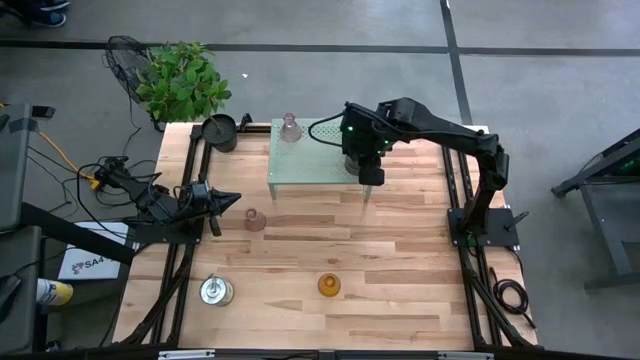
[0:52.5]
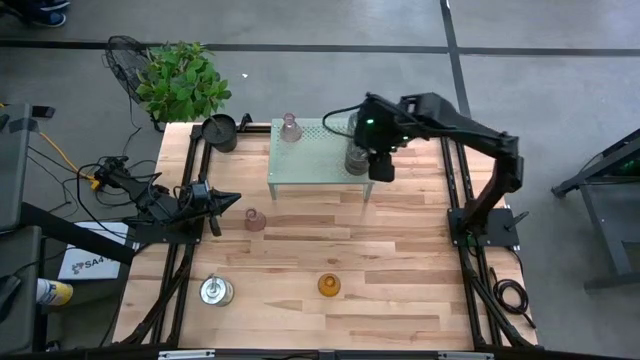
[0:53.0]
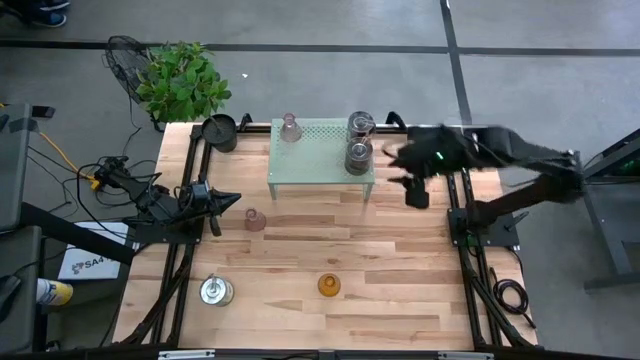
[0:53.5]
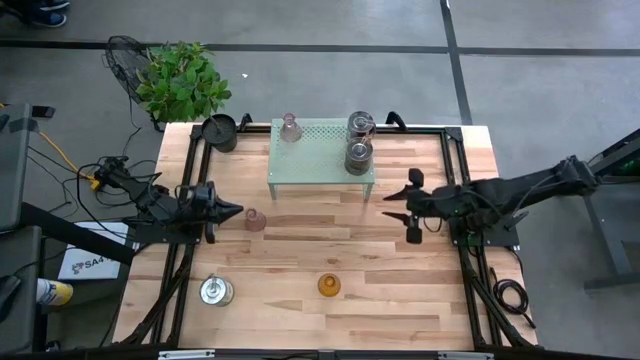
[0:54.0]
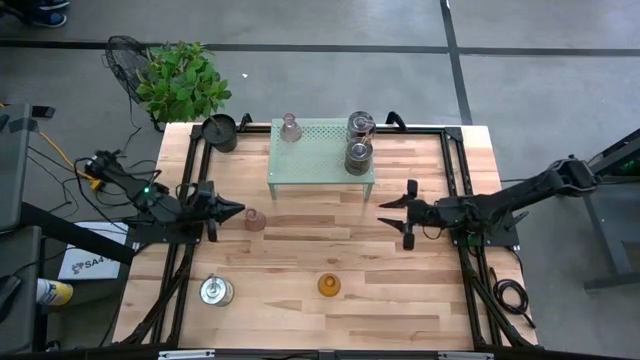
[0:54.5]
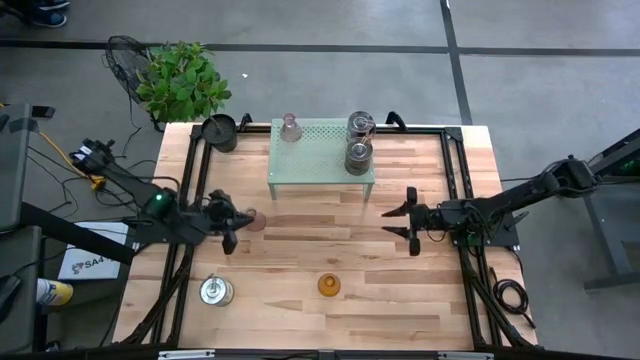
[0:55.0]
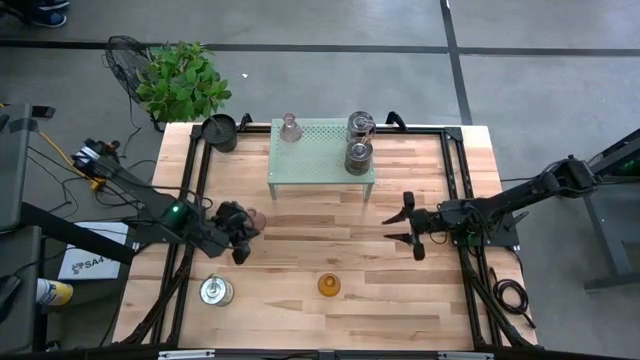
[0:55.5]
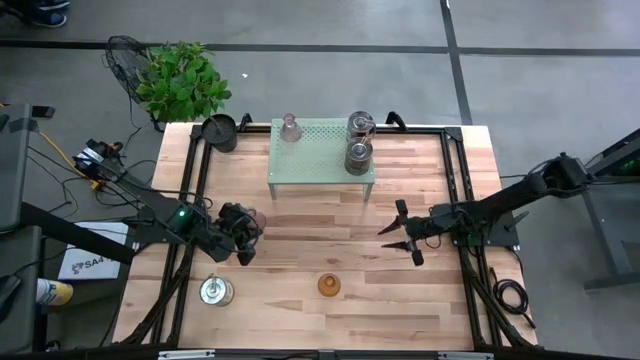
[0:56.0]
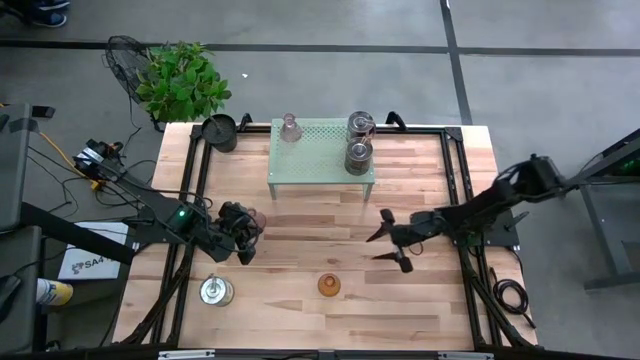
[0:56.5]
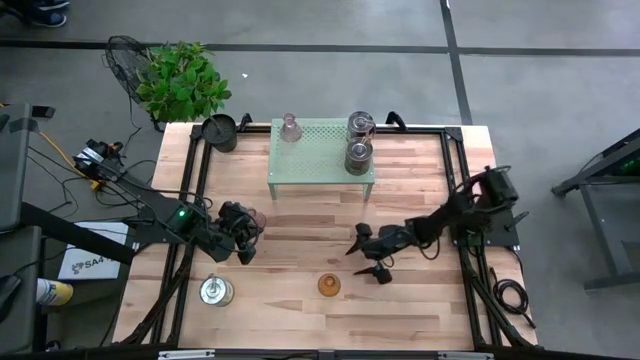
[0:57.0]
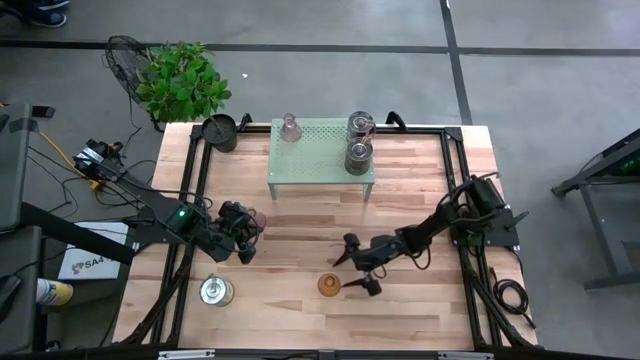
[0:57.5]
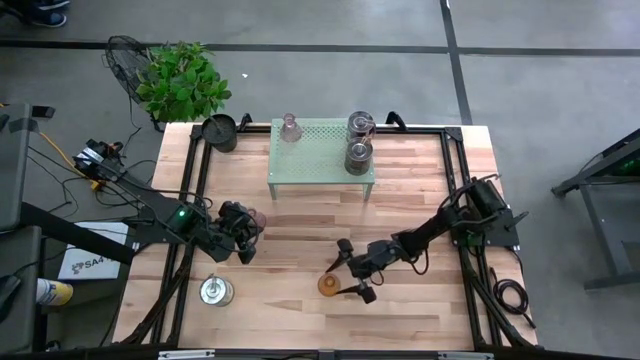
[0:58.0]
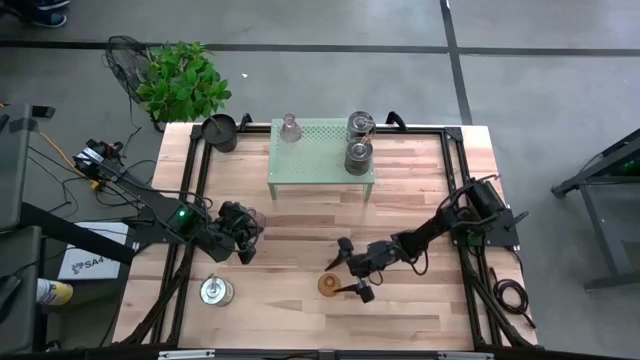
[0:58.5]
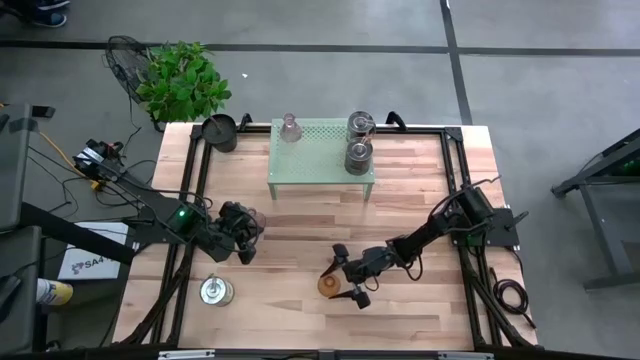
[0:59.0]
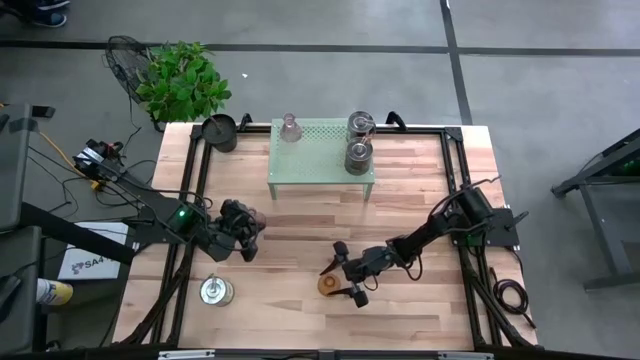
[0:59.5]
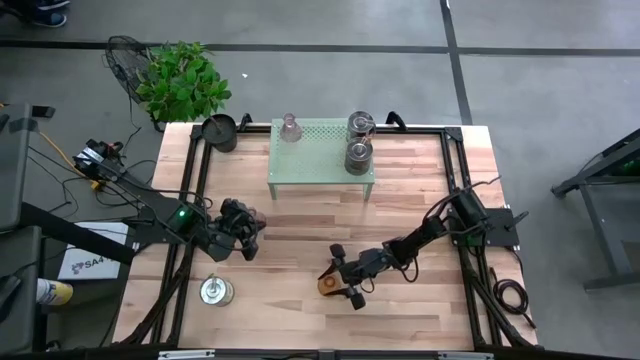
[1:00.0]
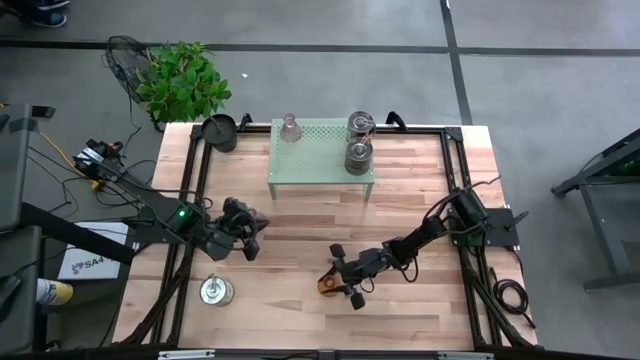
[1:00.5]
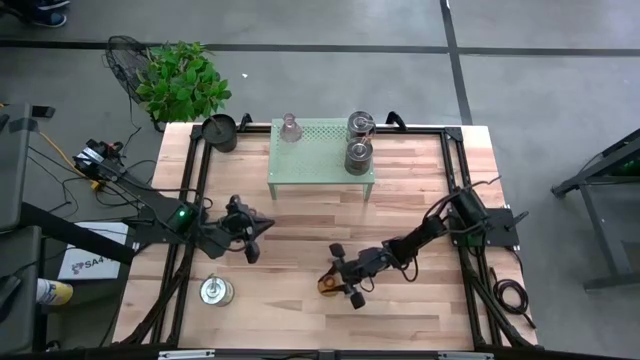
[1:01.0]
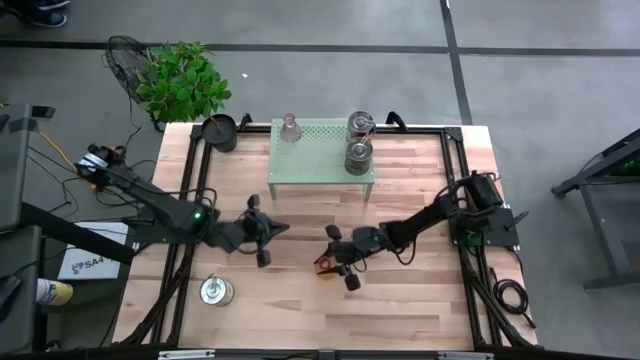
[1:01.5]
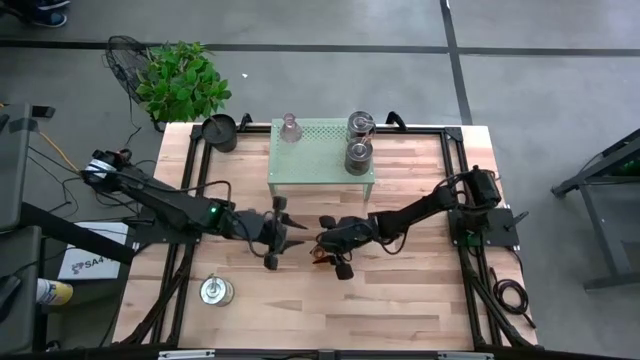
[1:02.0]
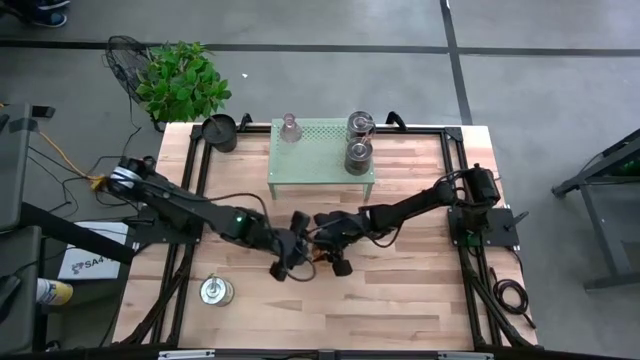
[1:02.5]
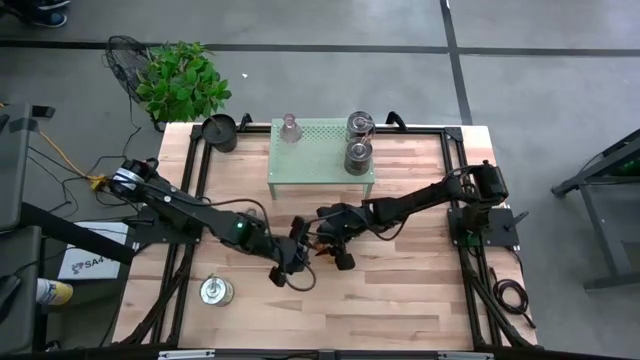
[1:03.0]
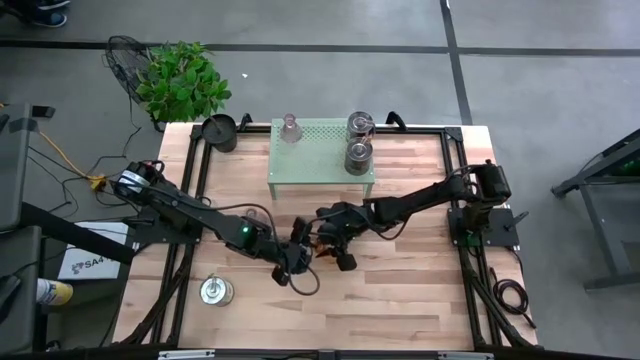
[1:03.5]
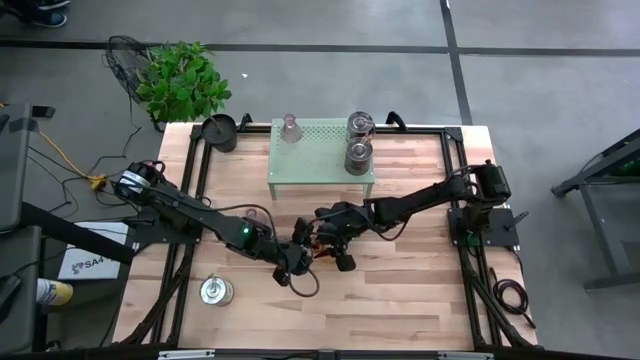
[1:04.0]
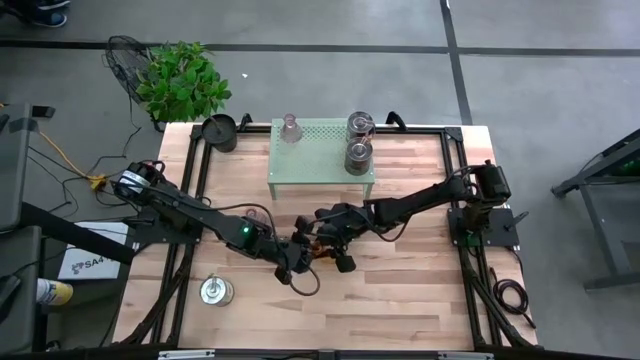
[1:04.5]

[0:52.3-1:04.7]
Task: Pick & Place candle stick holders
Put the yellow candle holder on the shelf

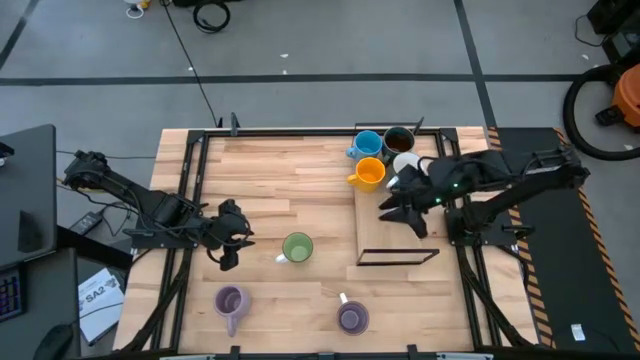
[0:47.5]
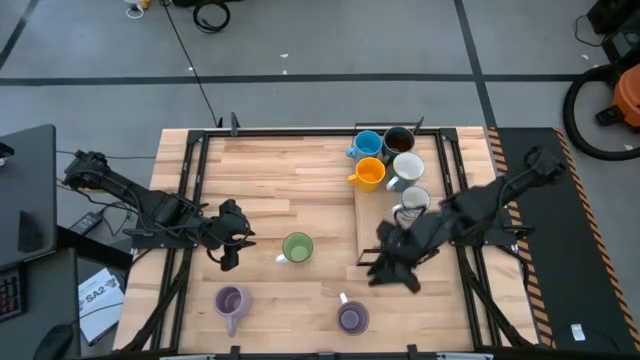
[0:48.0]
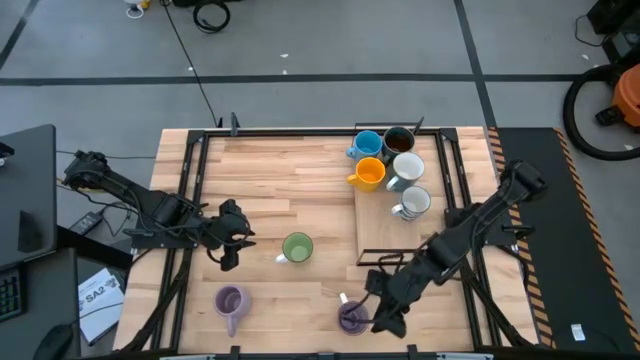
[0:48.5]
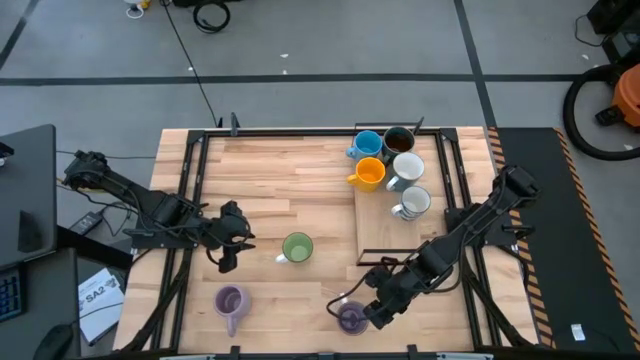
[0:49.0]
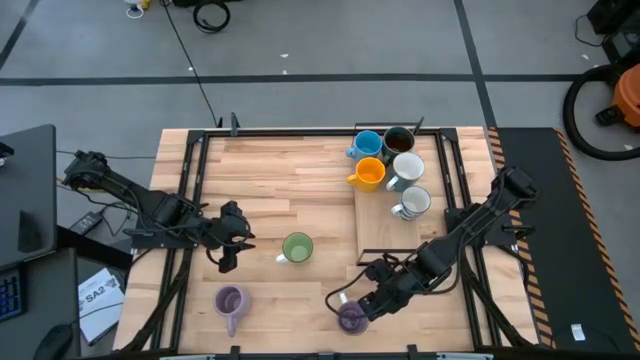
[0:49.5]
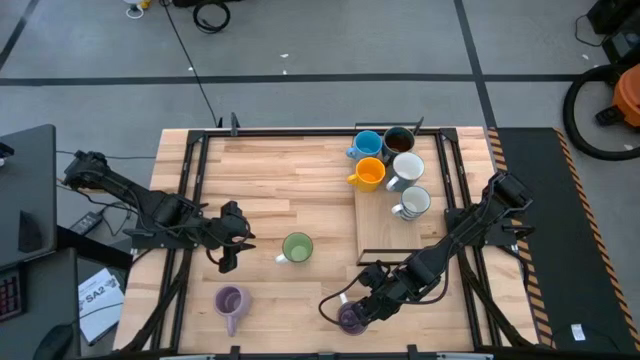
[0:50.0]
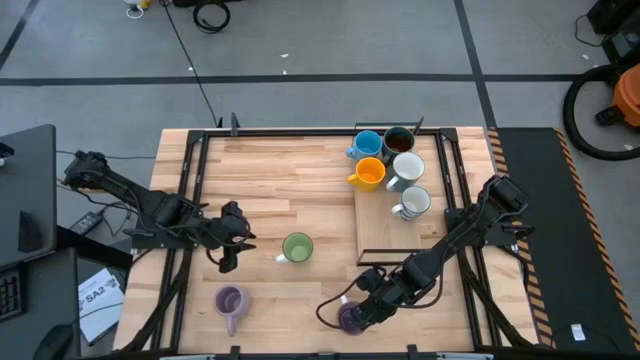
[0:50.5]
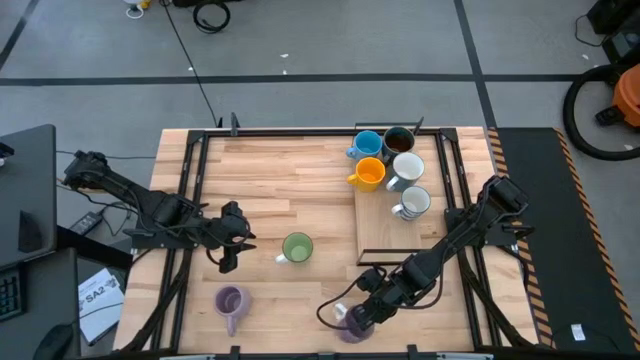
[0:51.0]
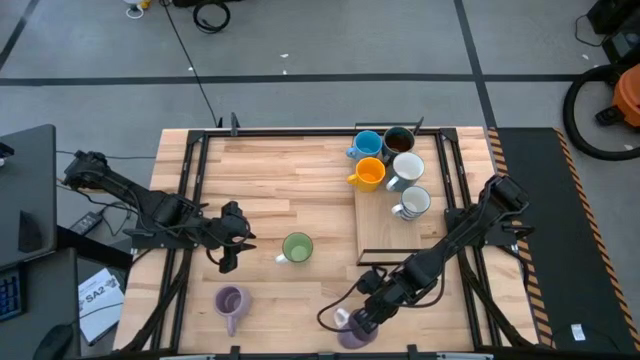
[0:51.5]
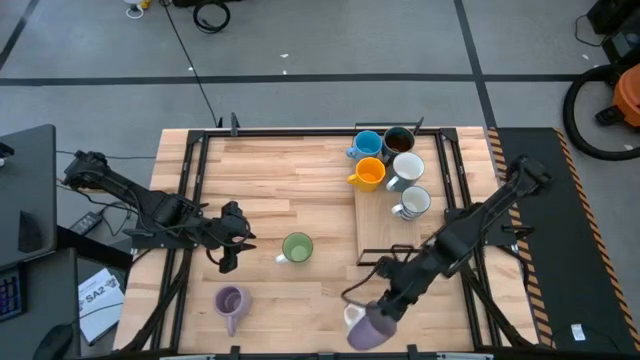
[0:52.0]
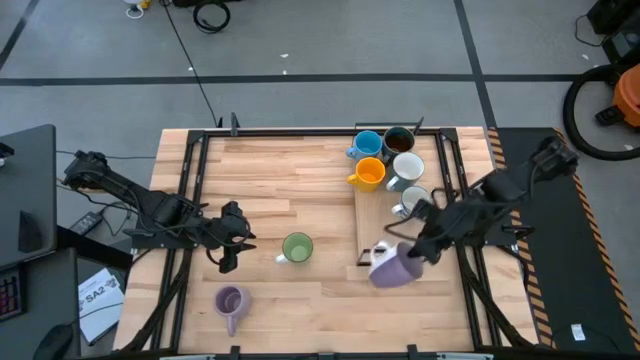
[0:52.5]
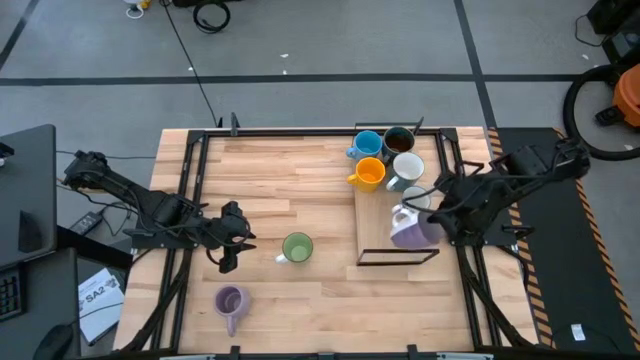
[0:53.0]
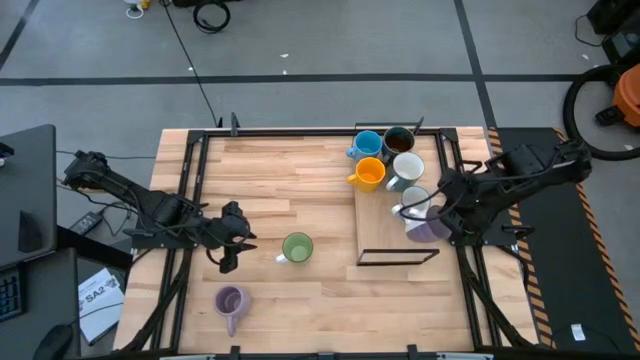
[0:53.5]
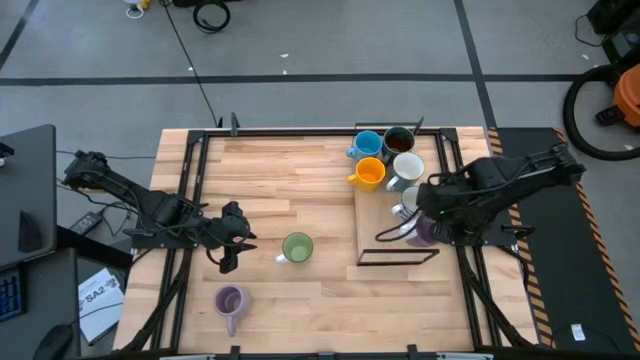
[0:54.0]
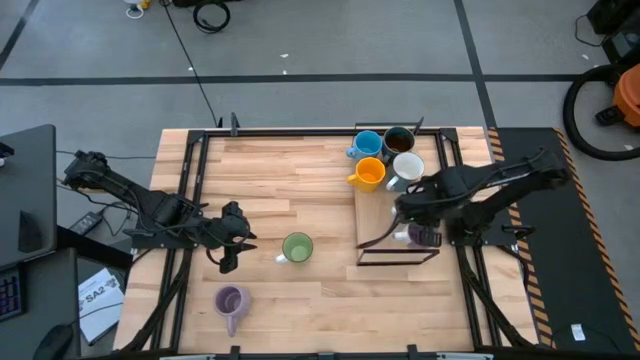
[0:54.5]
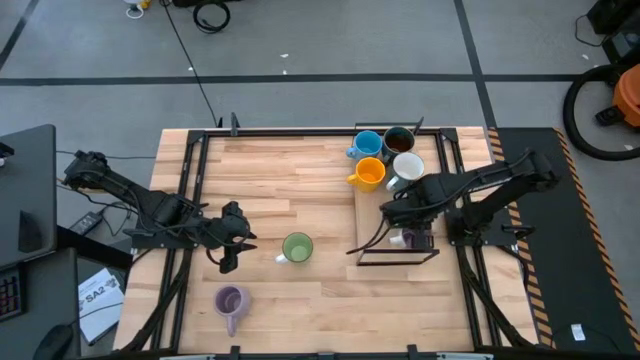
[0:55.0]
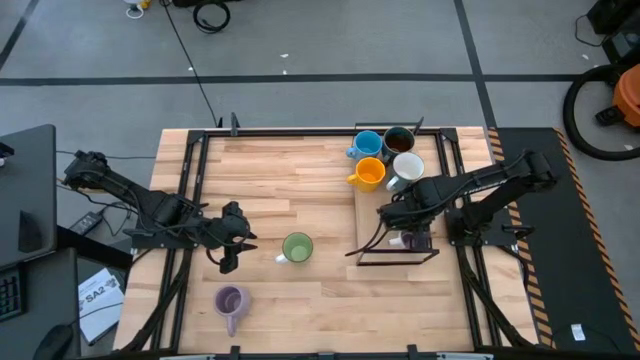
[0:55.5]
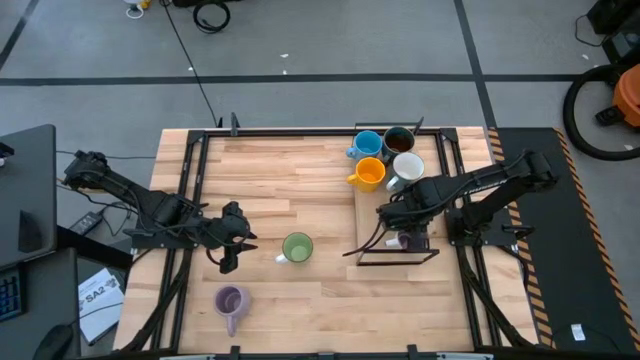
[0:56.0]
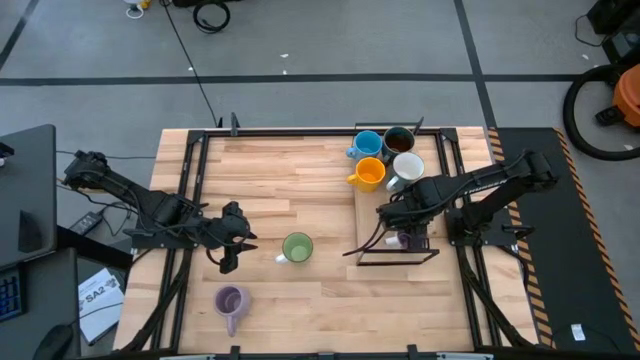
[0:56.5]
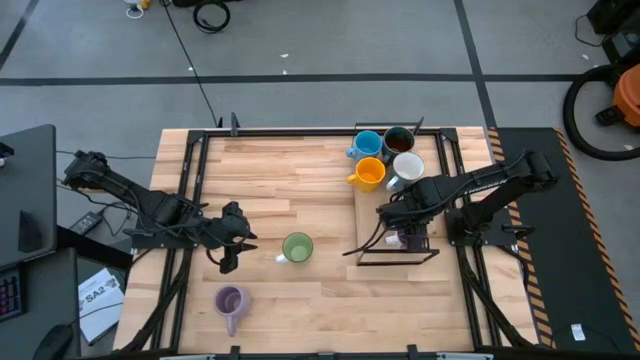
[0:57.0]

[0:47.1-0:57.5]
Task: Place coffee mugs
Put the purple patterned mug on the shelf
